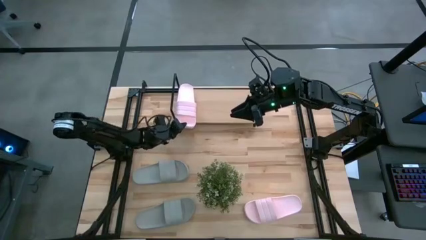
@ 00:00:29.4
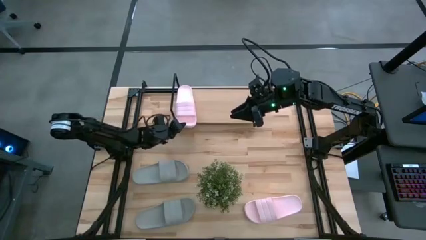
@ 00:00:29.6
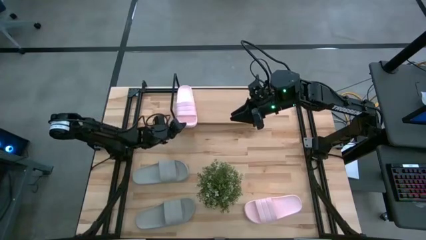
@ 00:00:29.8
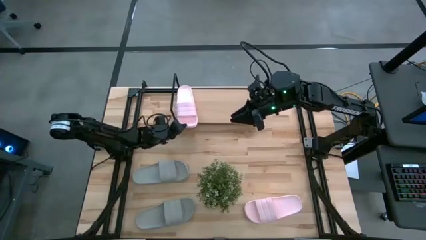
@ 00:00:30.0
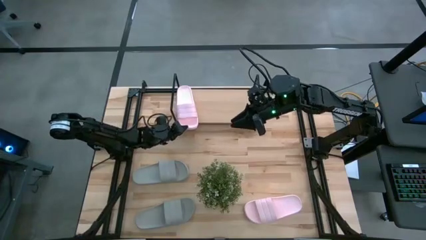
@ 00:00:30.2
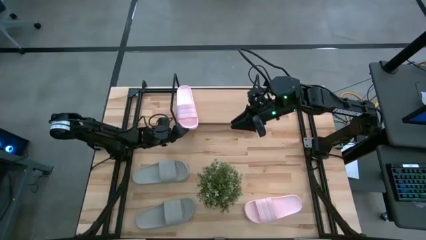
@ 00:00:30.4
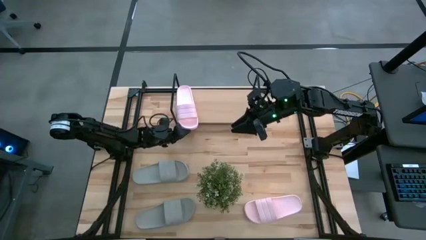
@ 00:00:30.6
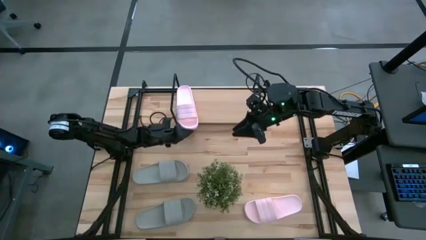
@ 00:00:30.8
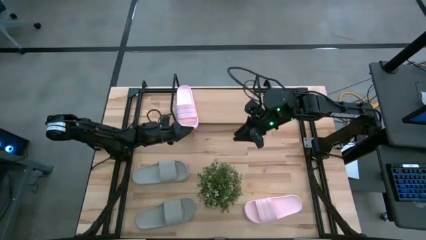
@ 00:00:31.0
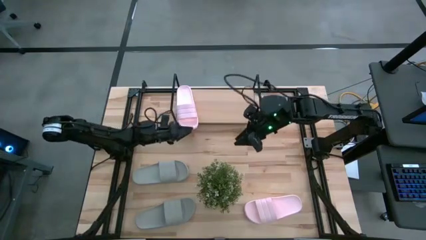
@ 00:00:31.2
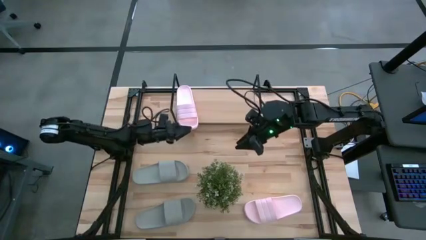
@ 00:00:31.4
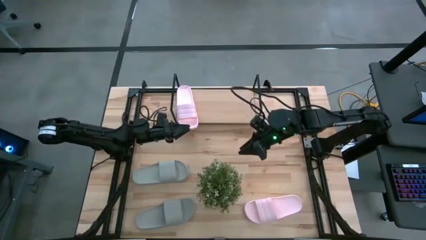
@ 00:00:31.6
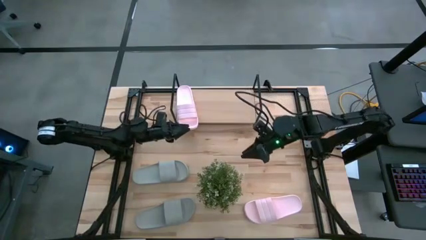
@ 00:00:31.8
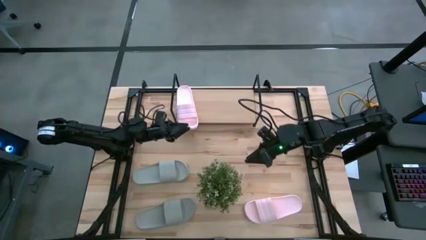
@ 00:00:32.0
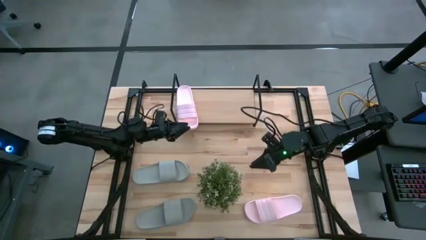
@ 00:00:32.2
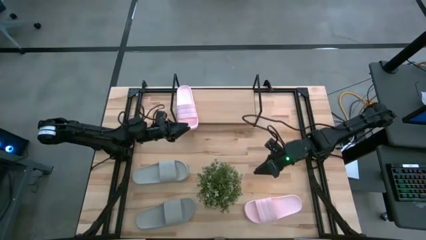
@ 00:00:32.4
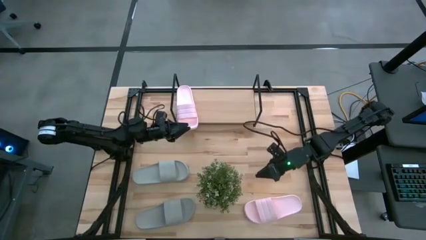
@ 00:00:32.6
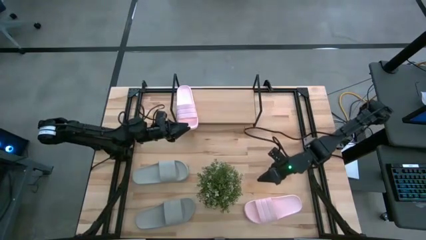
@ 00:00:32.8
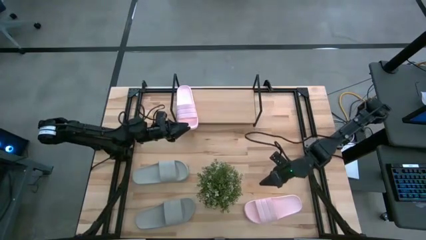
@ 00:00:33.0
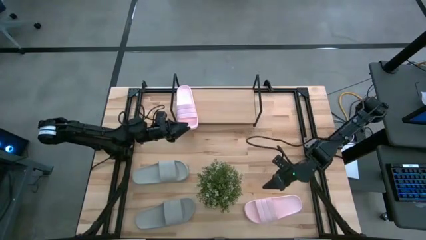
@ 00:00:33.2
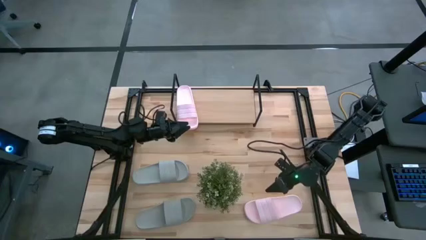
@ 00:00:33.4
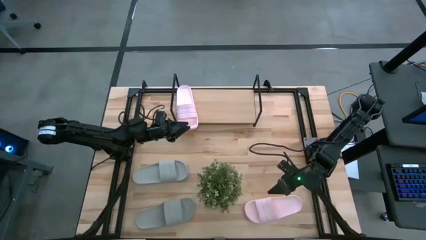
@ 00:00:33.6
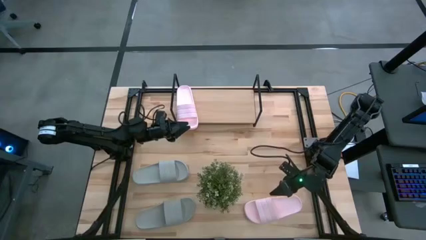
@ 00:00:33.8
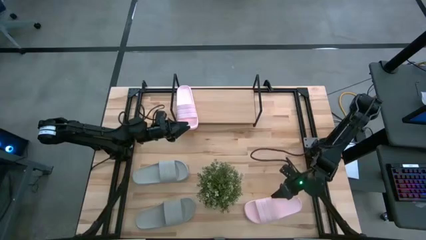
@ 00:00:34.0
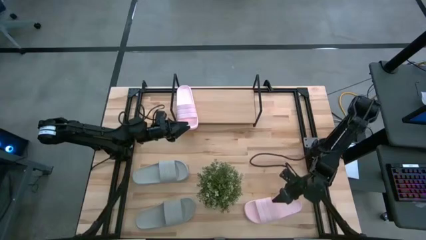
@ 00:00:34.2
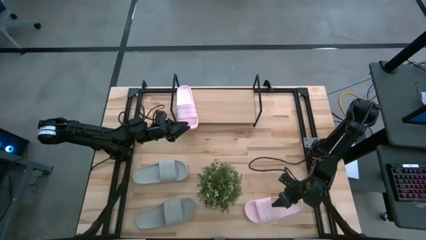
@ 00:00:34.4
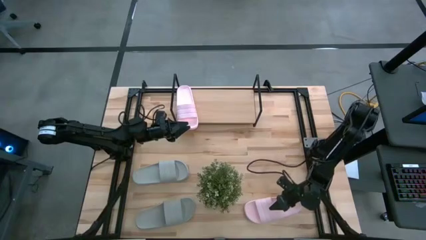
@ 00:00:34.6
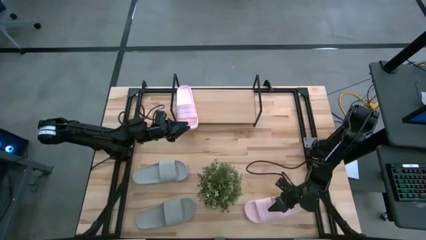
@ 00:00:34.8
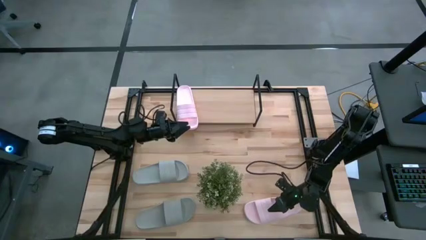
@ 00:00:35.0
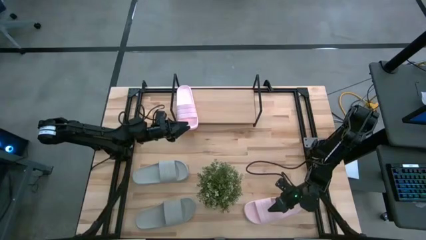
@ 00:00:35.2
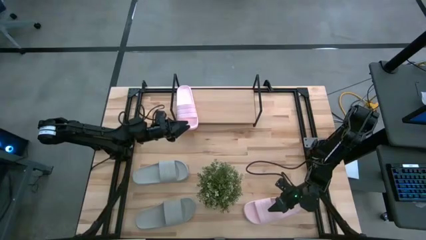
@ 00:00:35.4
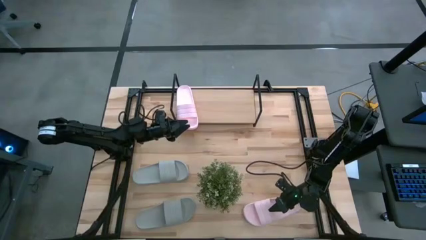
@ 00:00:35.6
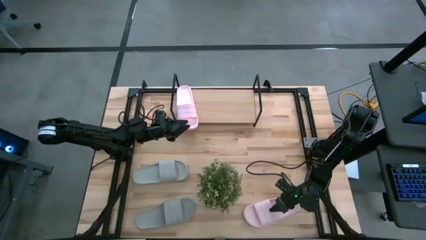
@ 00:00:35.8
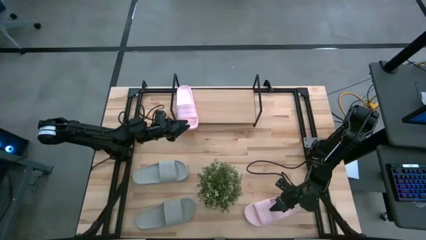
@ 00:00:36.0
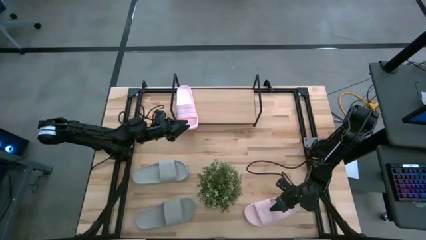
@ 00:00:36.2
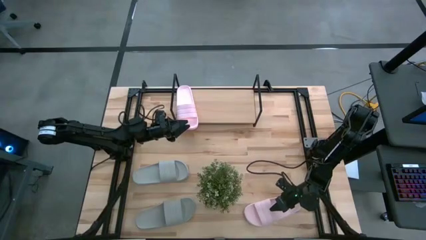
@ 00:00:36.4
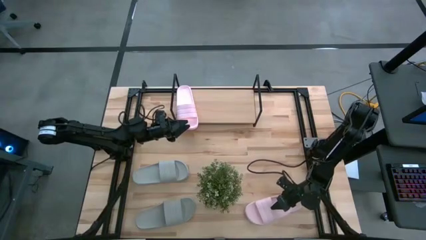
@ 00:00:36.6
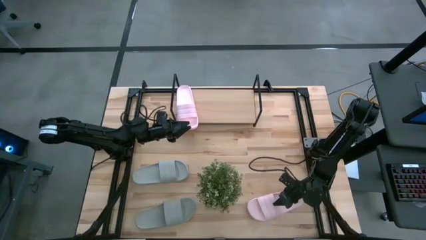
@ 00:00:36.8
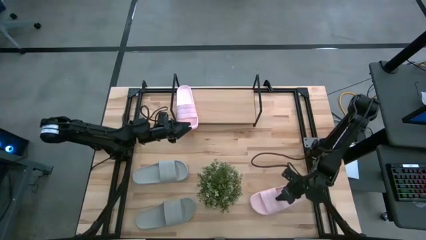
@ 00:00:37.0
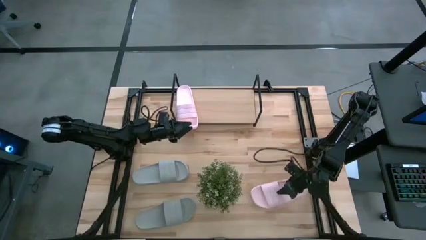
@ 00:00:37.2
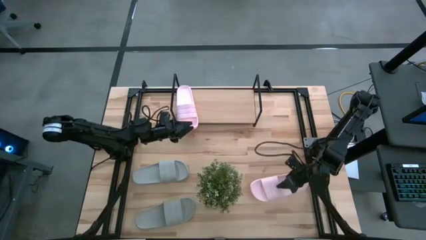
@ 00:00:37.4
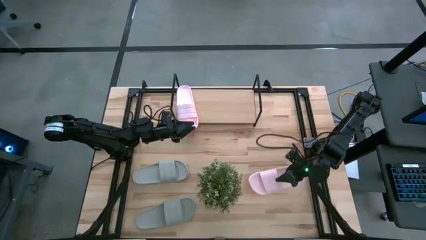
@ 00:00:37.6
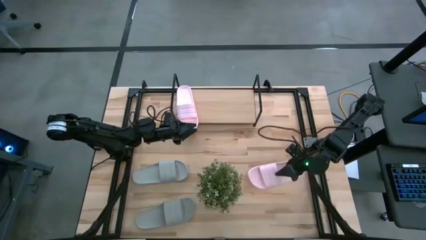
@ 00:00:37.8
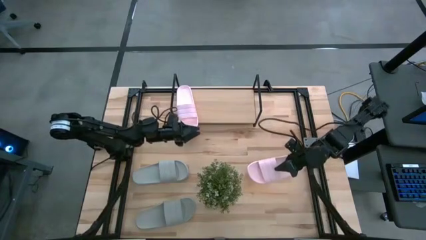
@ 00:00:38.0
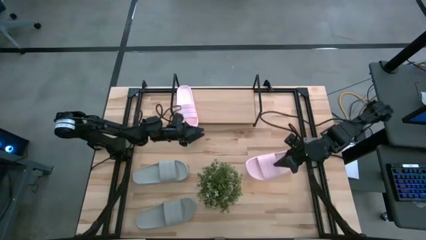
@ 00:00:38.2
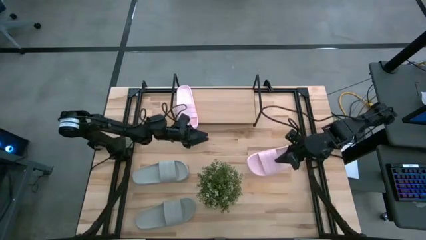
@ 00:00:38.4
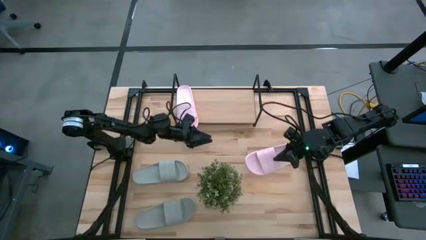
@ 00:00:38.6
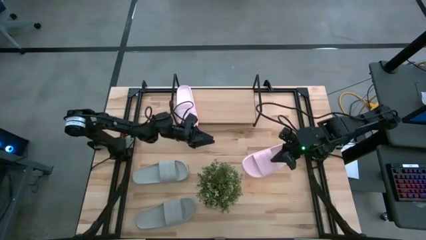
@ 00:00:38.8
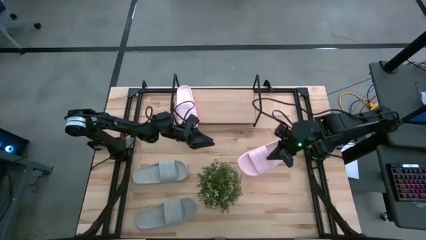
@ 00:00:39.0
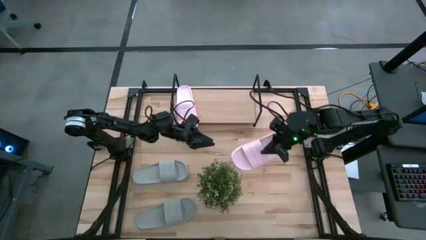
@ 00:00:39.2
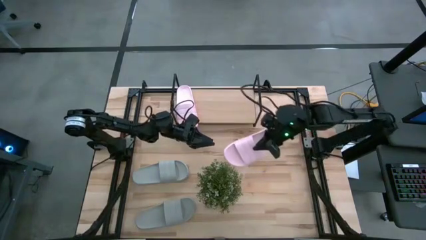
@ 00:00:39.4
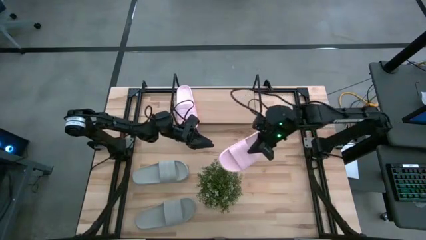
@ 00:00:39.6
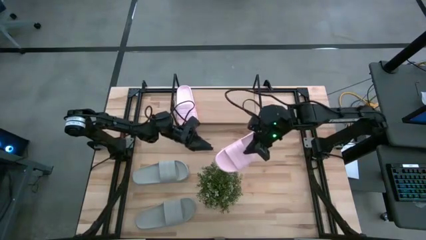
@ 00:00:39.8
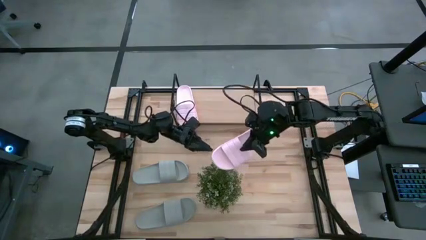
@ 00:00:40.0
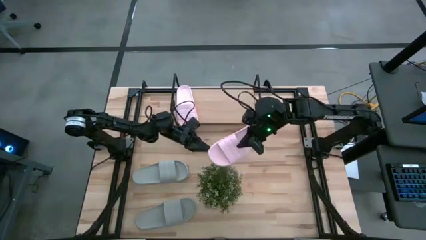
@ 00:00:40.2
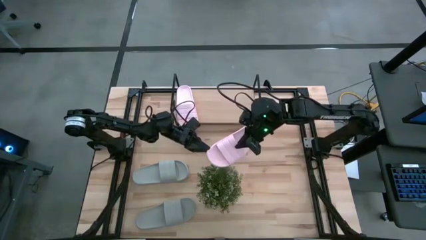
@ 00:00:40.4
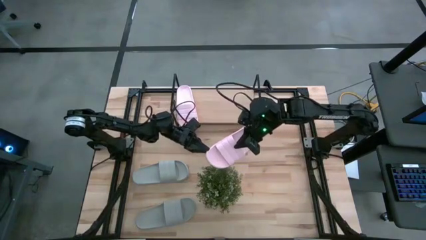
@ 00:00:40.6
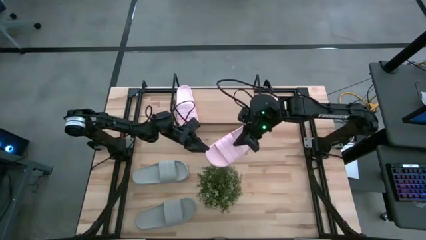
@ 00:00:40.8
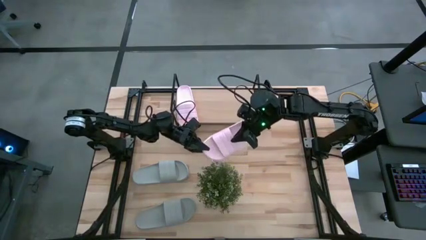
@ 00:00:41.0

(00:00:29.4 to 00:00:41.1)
Task: Pick and place slides into the shelf
Put the pink slide on the shelf

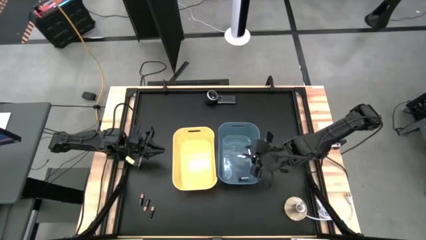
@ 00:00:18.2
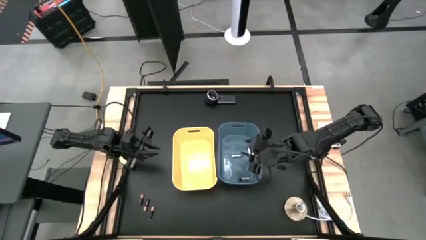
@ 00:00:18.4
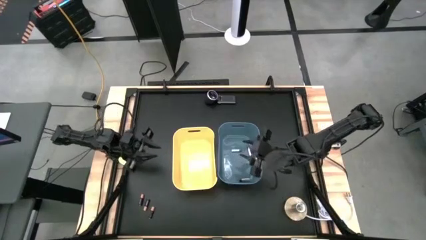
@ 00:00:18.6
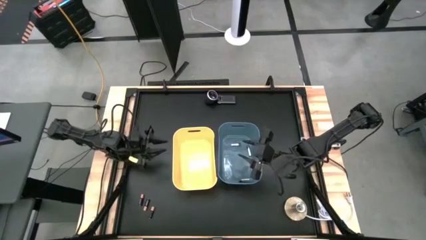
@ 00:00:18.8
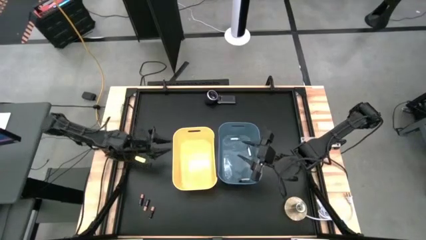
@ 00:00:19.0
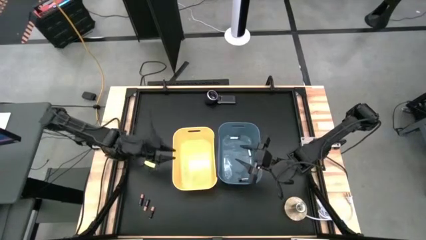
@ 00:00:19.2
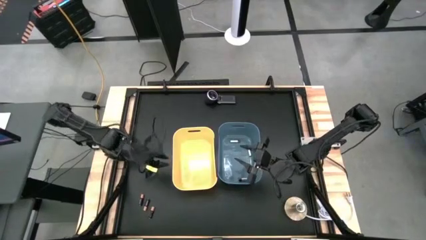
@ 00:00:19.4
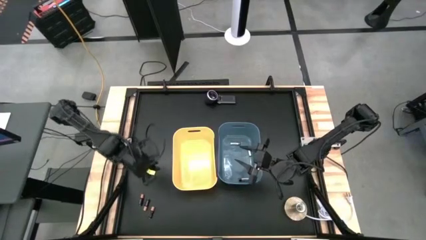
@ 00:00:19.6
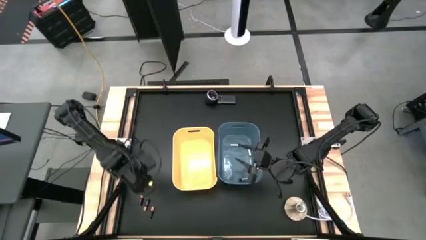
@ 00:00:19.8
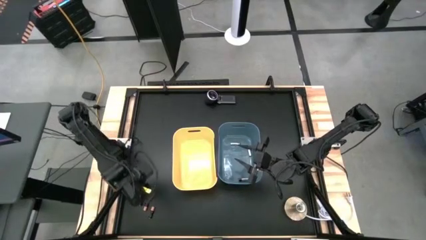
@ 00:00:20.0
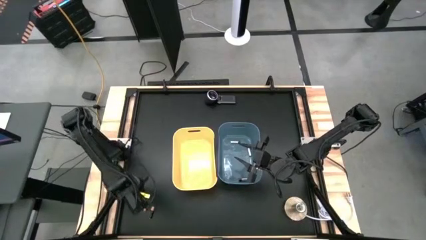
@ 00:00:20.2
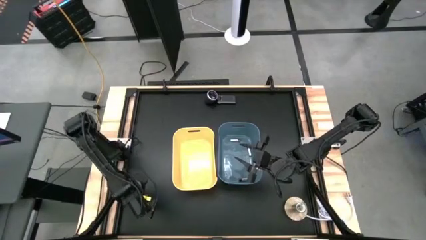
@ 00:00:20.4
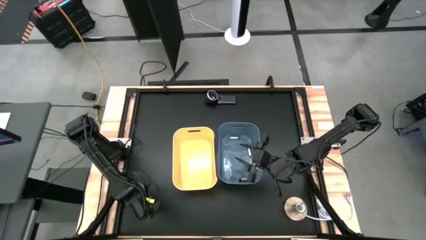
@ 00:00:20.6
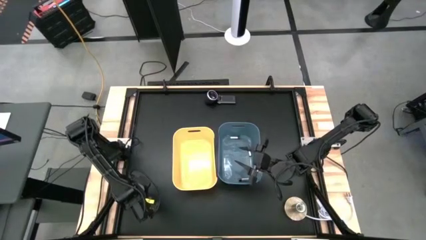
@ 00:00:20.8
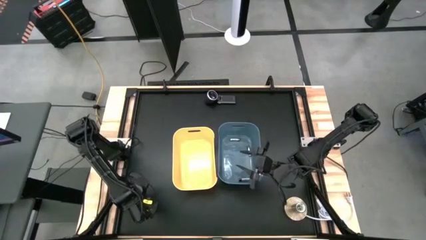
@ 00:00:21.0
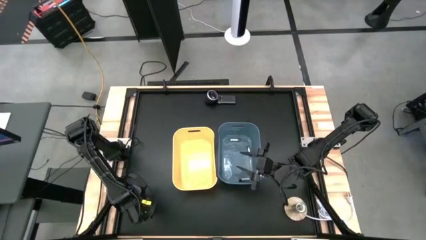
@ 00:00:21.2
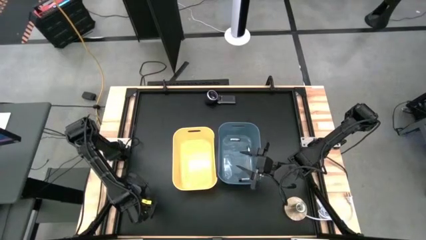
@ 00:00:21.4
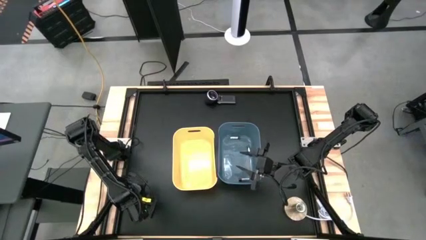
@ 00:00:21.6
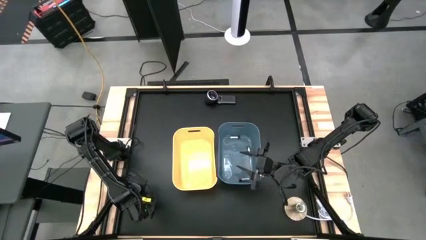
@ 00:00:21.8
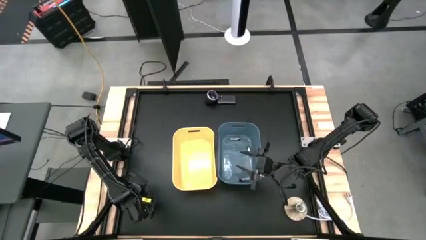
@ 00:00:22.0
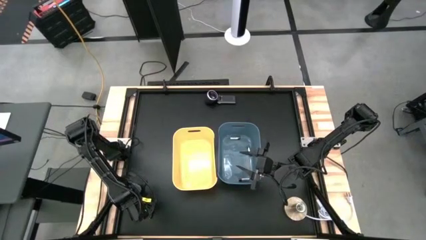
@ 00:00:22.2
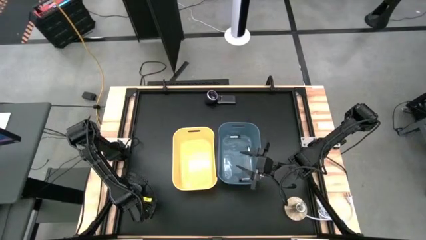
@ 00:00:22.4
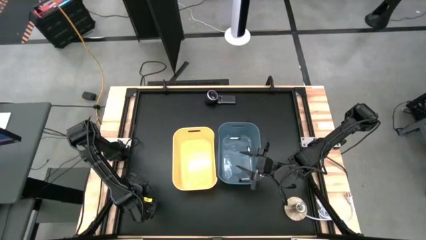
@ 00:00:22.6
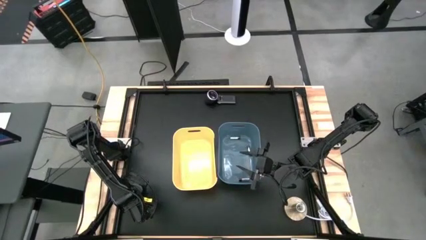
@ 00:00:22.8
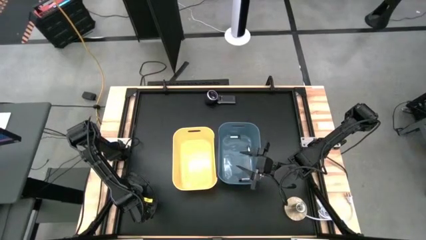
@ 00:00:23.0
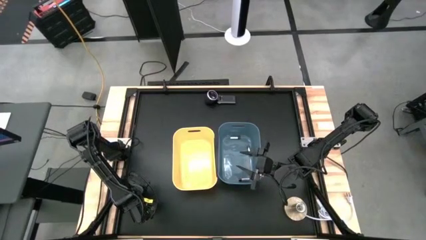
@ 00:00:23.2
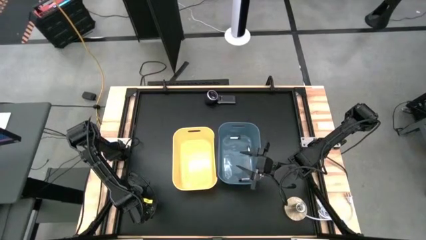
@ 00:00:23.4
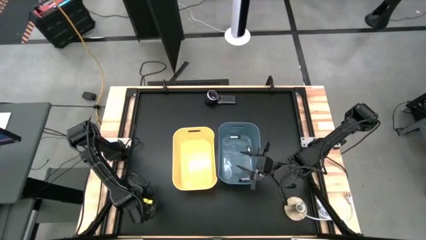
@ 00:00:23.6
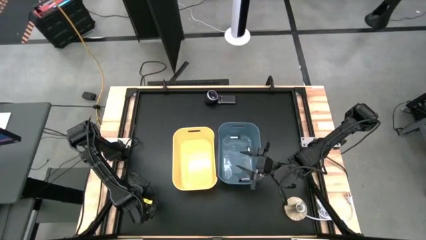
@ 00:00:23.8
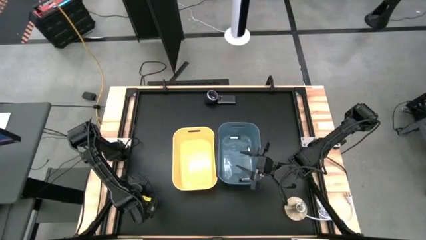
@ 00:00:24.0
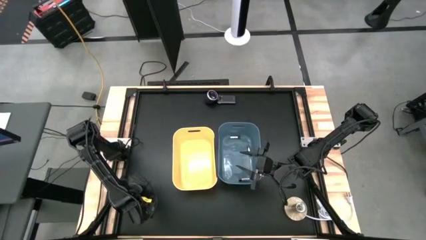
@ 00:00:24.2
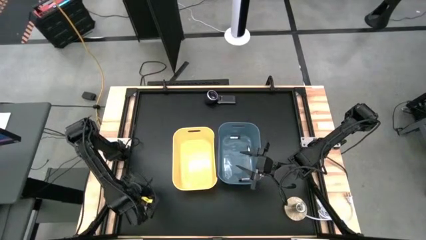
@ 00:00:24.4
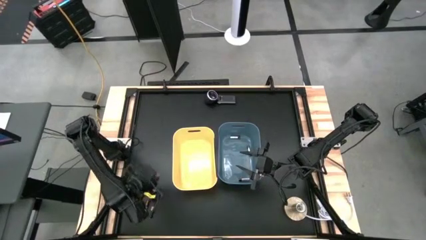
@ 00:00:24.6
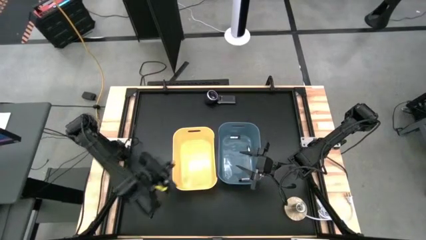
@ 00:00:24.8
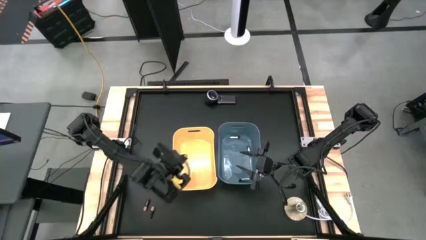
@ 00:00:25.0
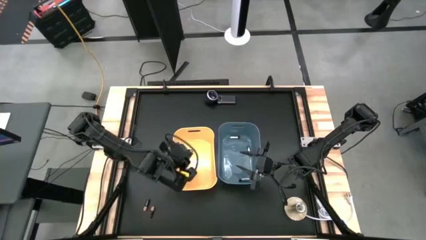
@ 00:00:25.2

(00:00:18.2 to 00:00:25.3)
Task: Sort batteries
Put the left black battery into the yellow bin
